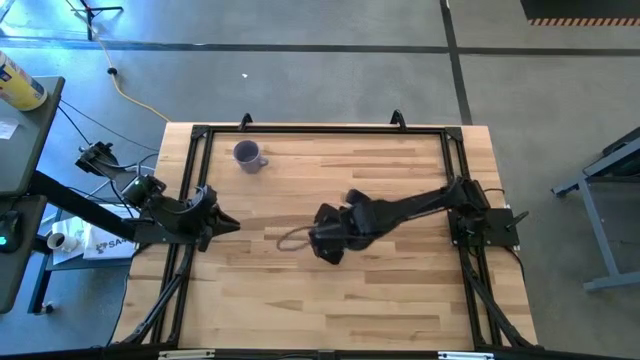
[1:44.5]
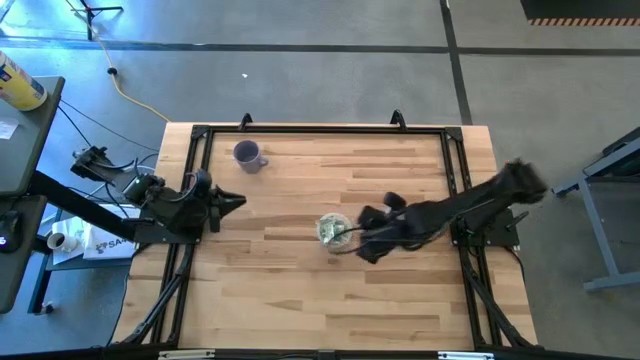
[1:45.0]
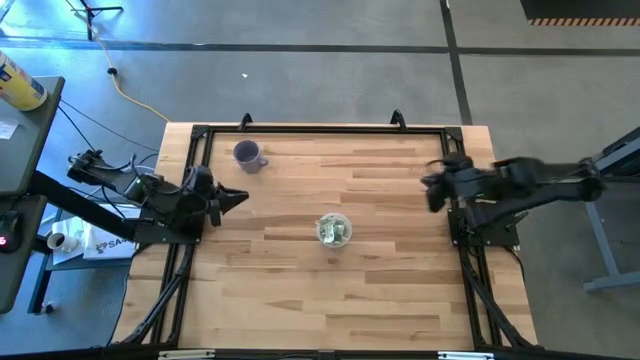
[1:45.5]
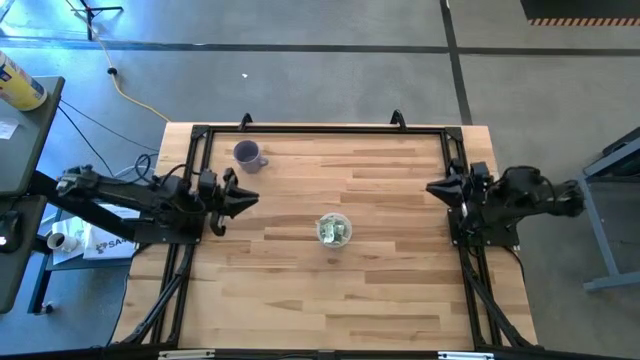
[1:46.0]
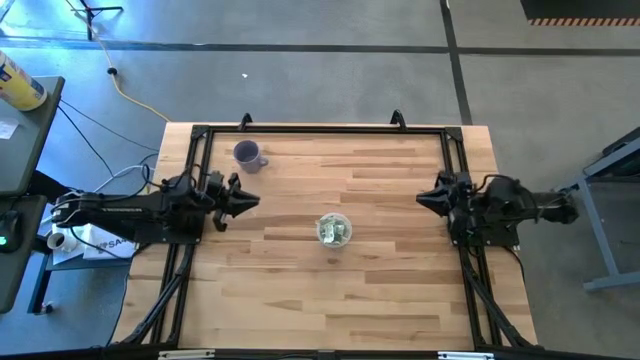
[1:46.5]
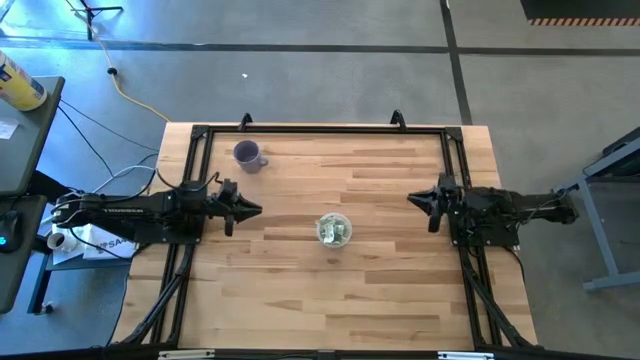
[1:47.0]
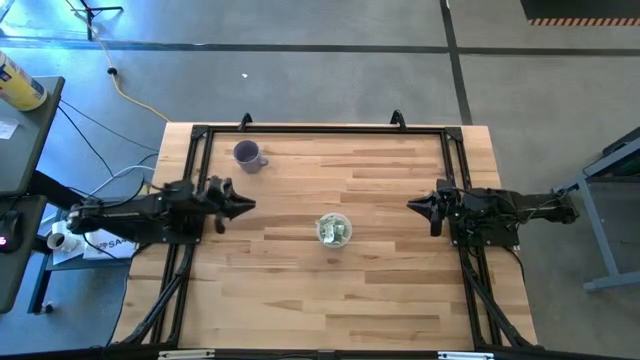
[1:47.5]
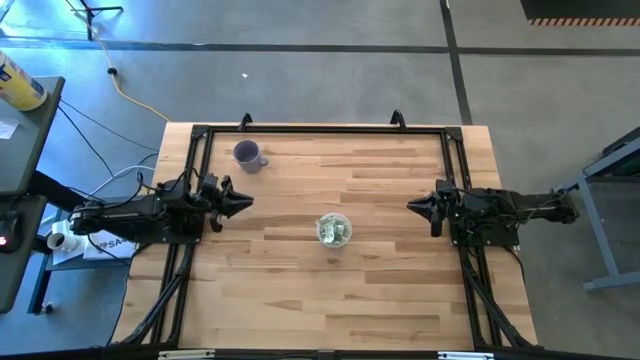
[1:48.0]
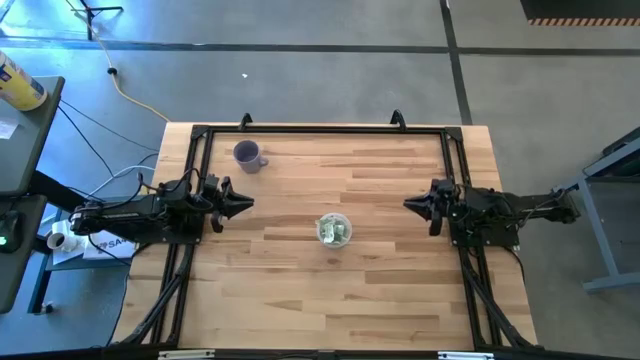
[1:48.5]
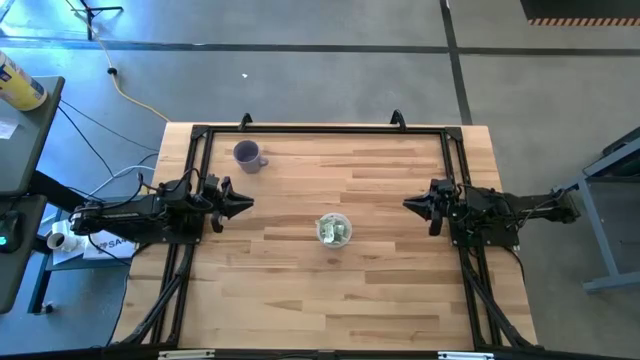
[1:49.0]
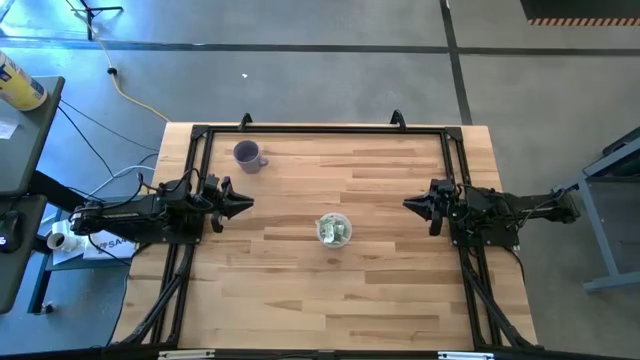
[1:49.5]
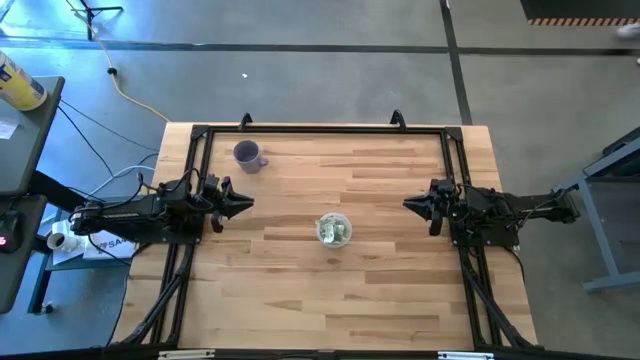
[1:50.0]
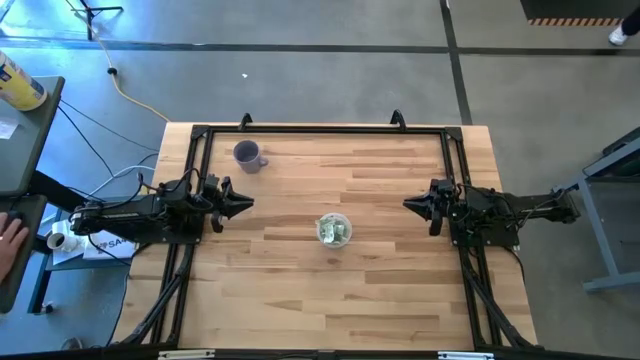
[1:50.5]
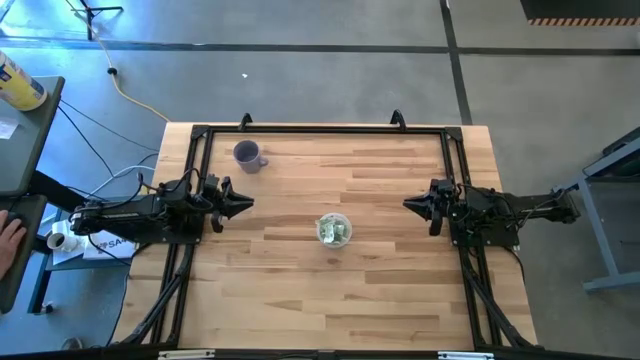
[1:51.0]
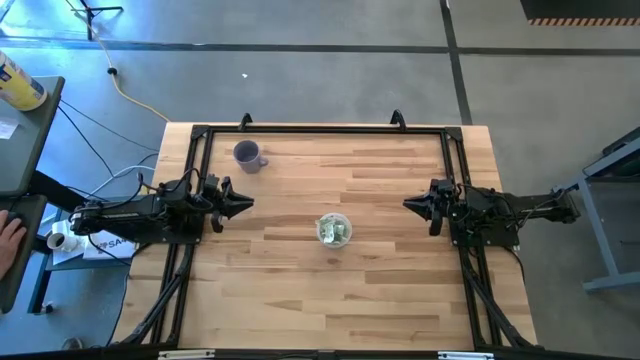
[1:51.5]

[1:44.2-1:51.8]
Task: Pick and place Stevia / Truvia into bins
Return to Home Position

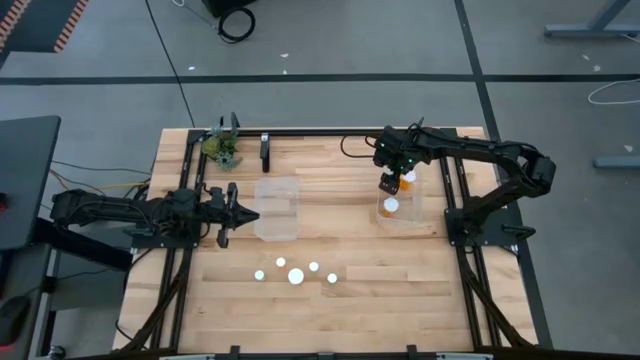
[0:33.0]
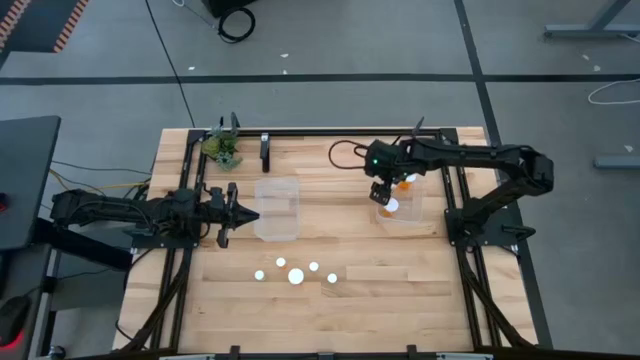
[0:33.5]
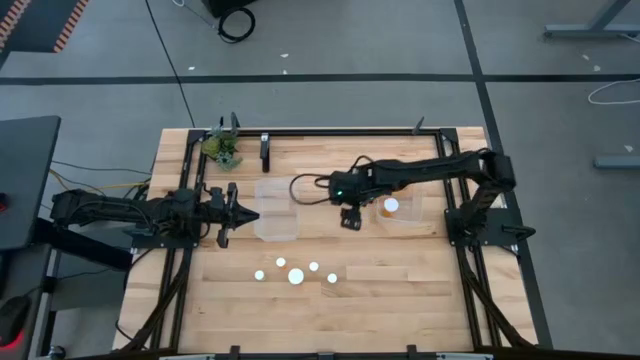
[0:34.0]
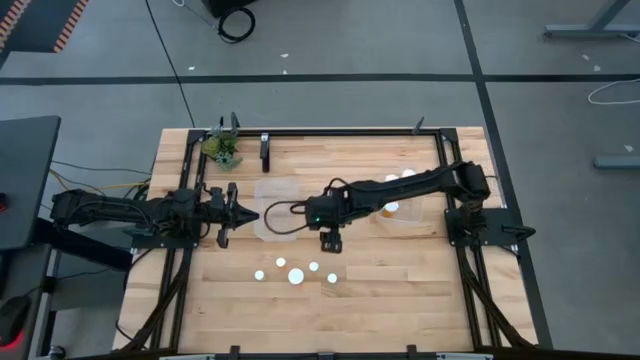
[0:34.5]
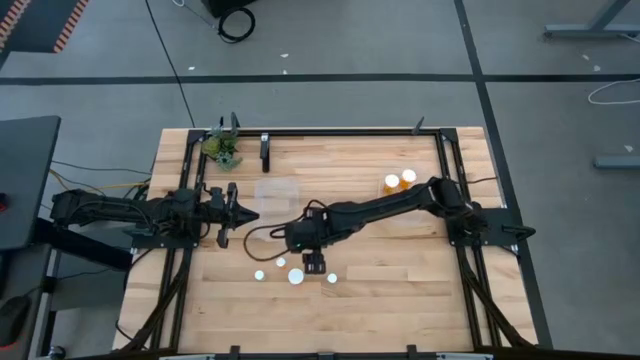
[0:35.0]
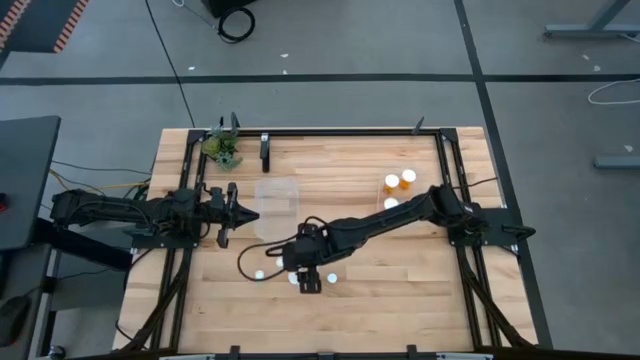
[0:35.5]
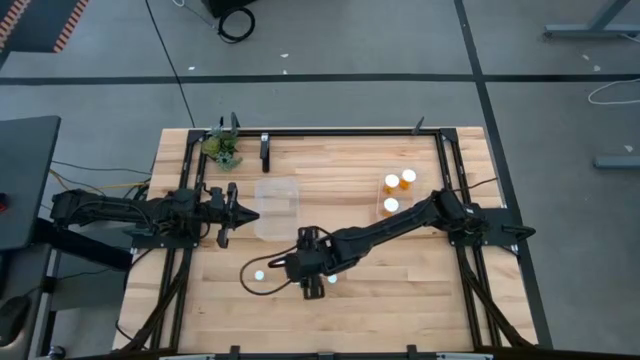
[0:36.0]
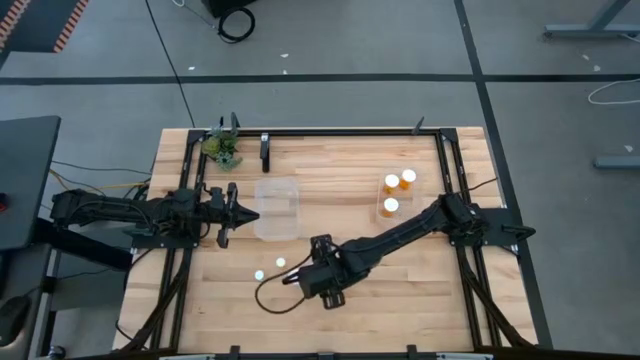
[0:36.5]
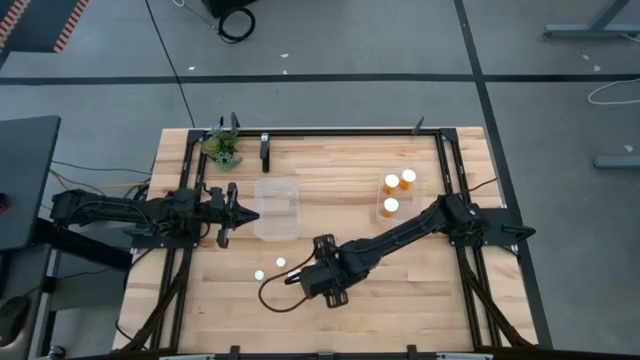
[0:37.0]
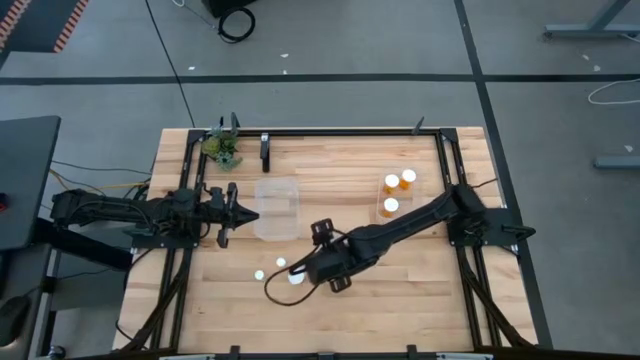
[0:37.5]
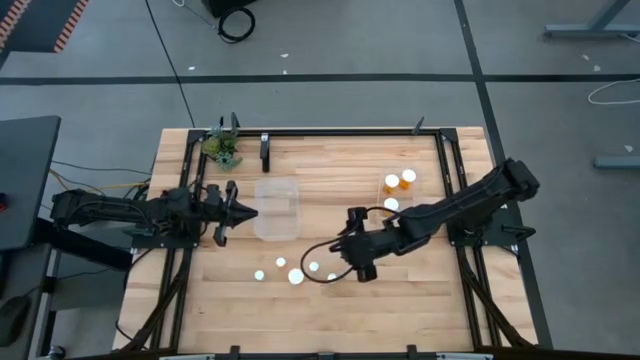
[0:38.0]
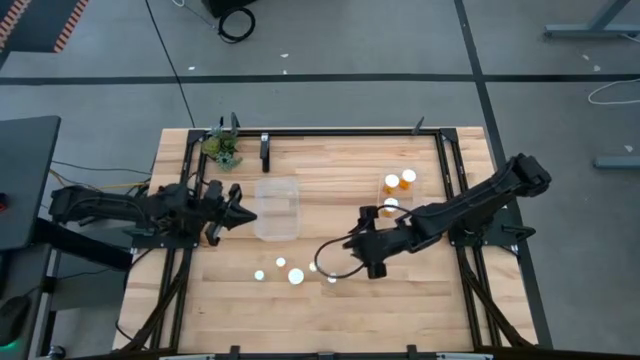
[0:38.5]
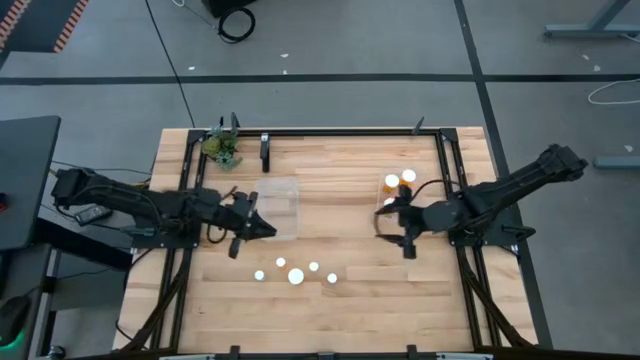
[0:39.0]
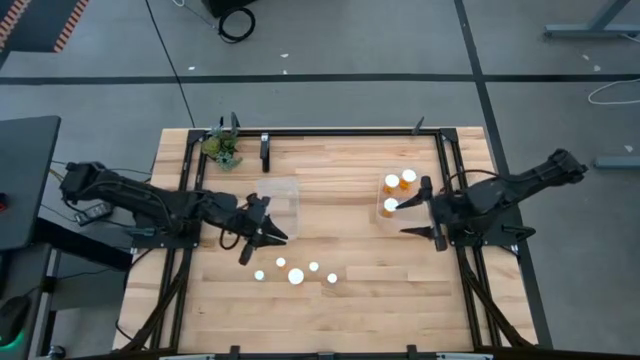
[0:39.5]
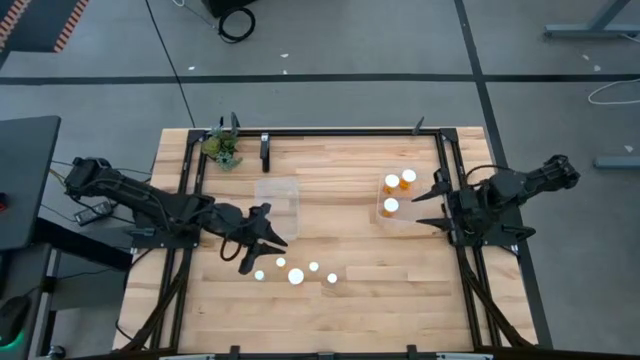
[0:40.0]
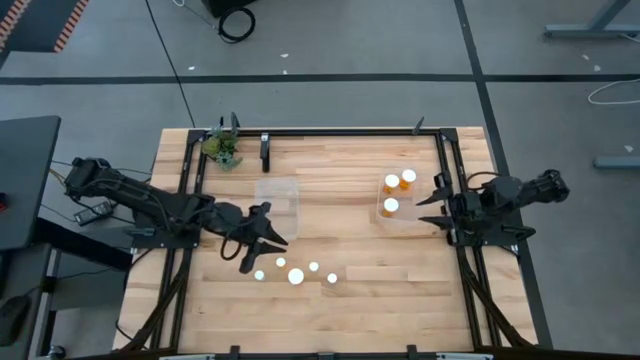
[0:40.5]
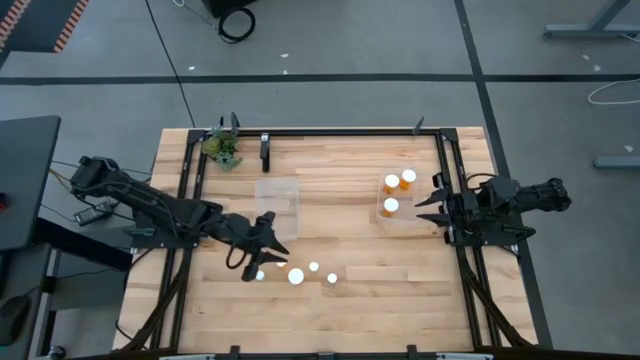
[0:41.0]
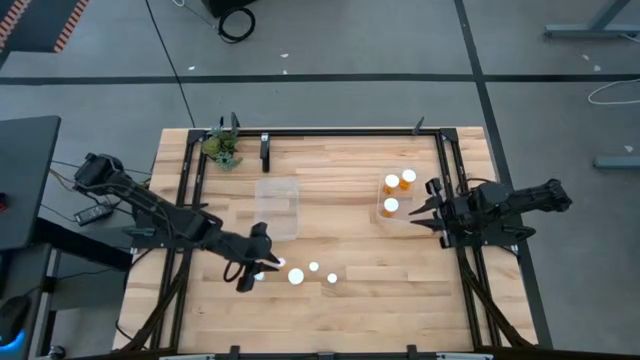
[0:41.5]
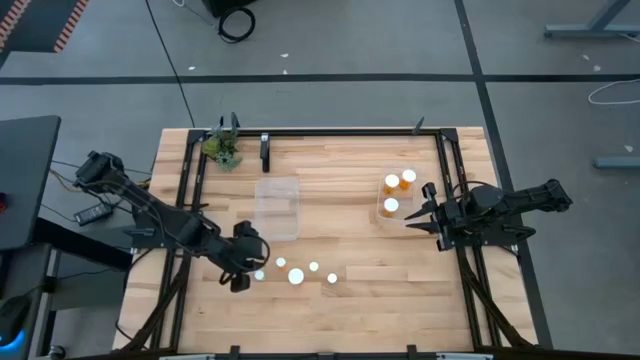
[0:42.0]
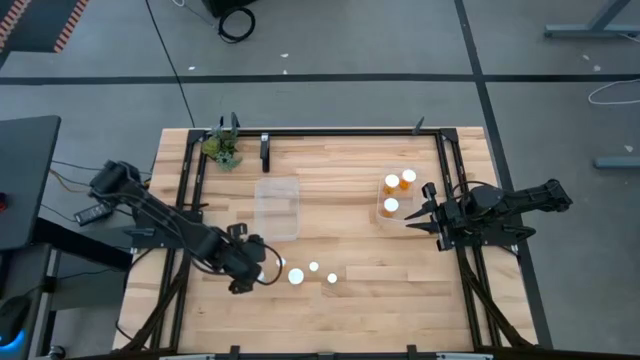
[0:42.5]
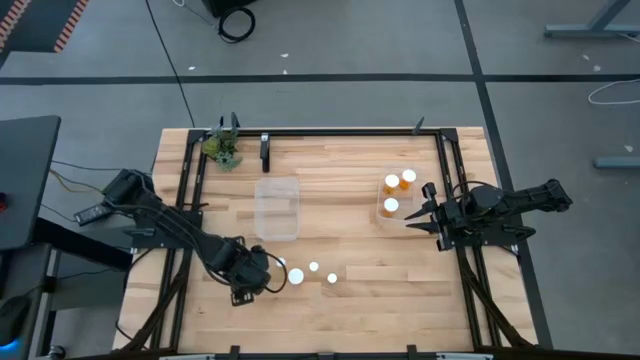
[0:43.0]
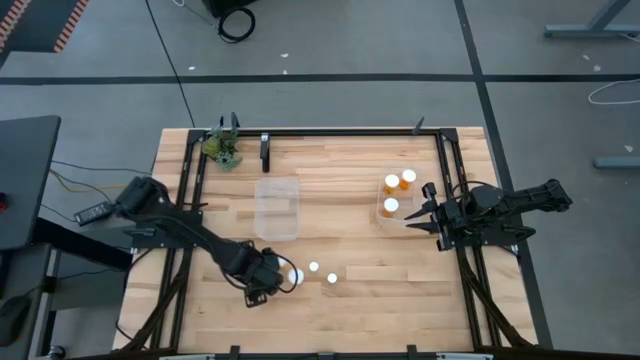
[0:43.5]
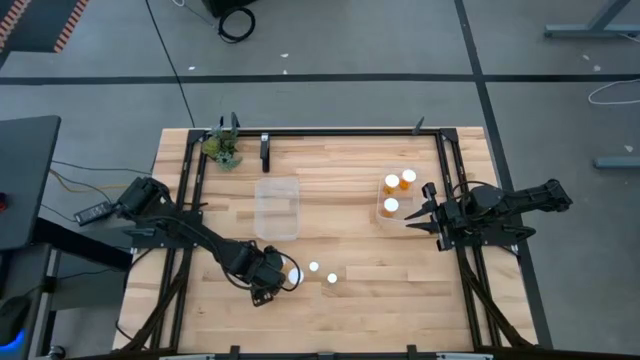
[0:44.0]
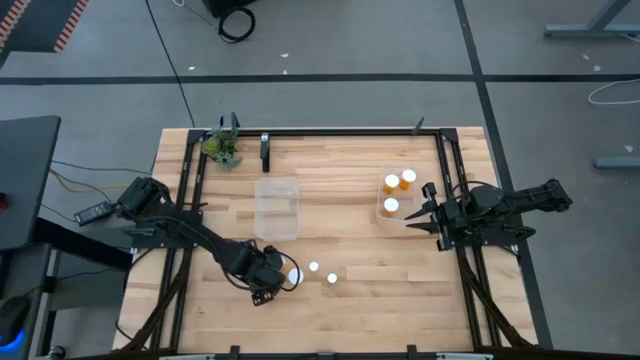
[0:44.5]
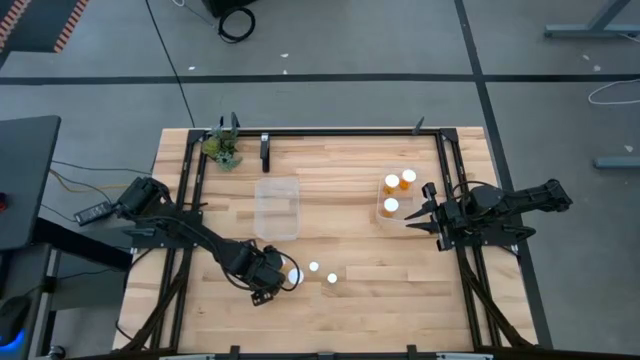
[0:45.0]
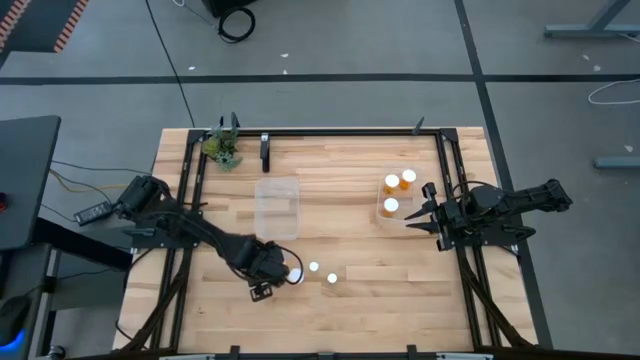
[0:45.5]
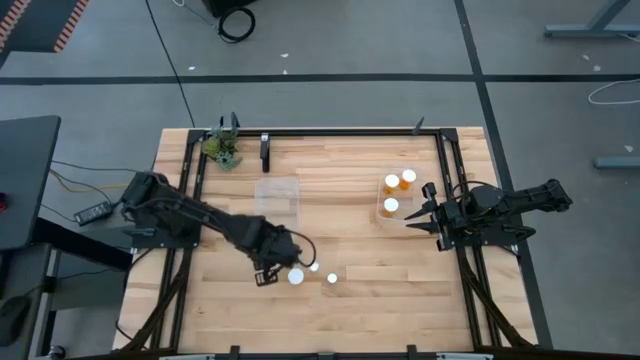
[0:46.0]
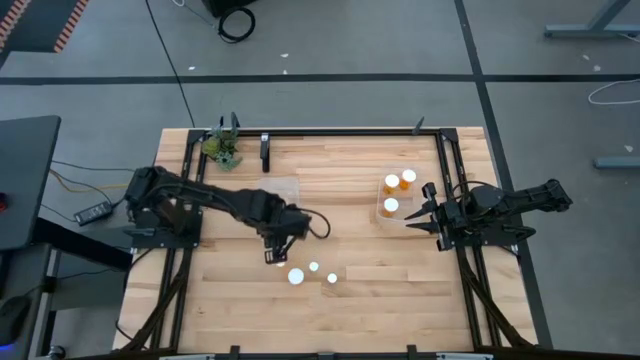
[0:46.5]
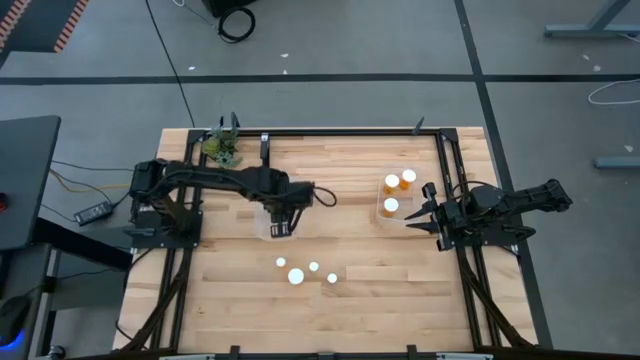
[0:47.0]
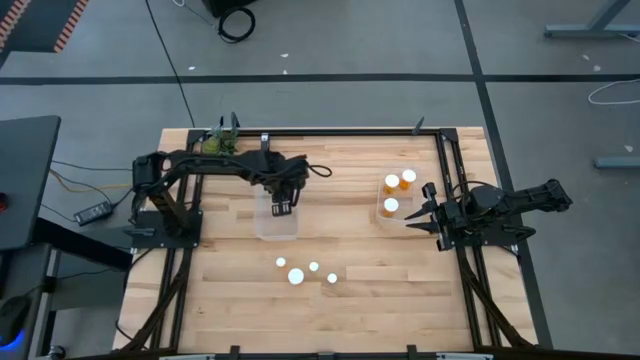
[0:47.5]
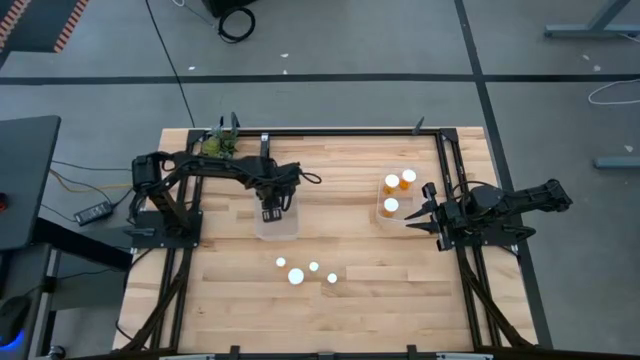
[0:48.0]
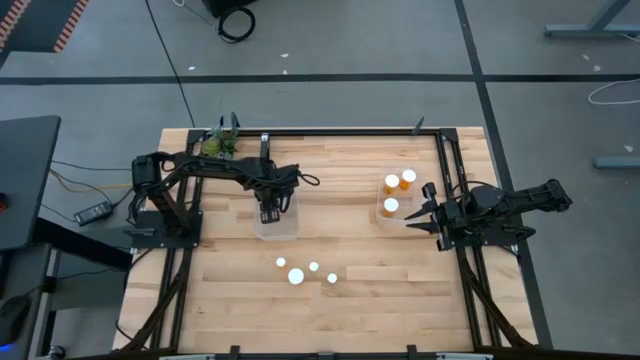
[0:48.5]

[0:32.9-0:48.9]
Task: Pick and place medicine bottles into bin by pill shape (circle, oval)
Put the left yellow pill bottle into the left transparent bin
